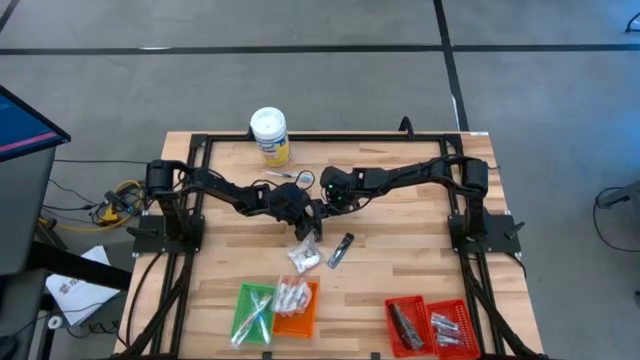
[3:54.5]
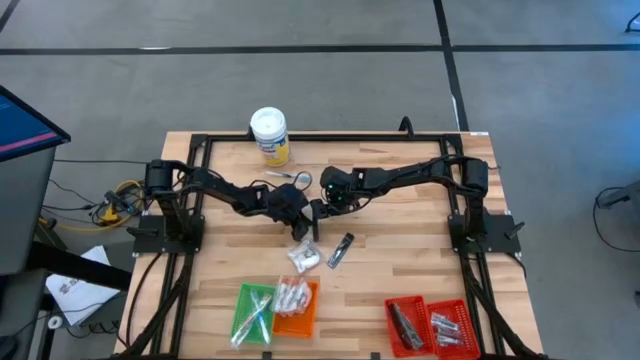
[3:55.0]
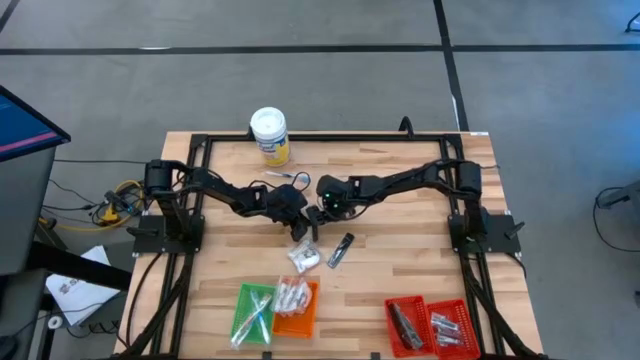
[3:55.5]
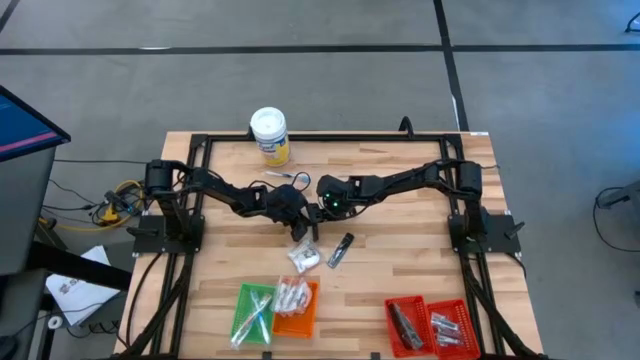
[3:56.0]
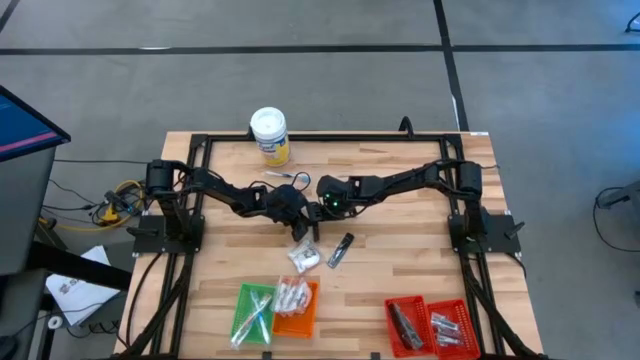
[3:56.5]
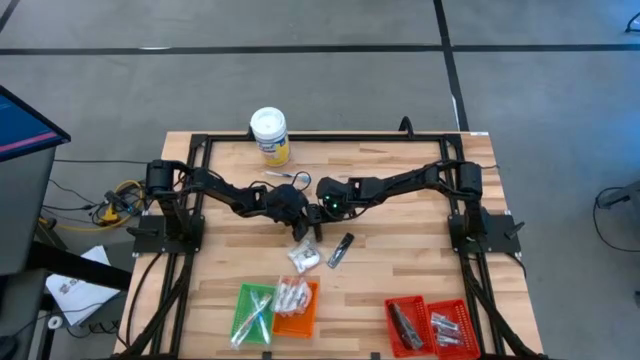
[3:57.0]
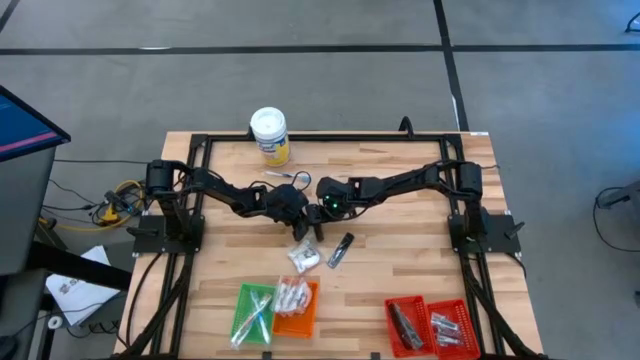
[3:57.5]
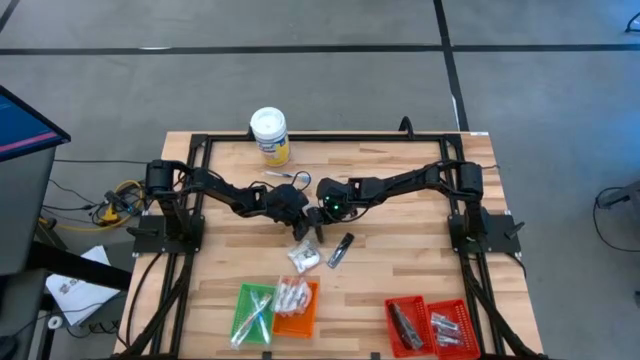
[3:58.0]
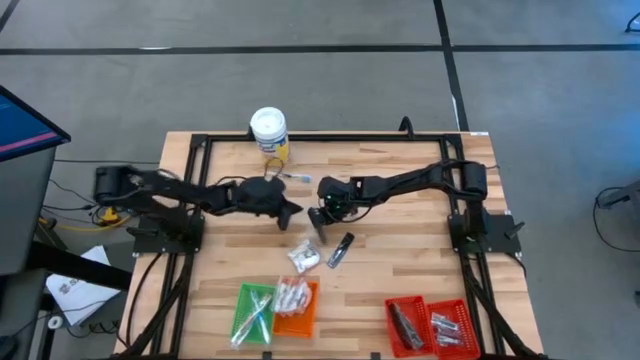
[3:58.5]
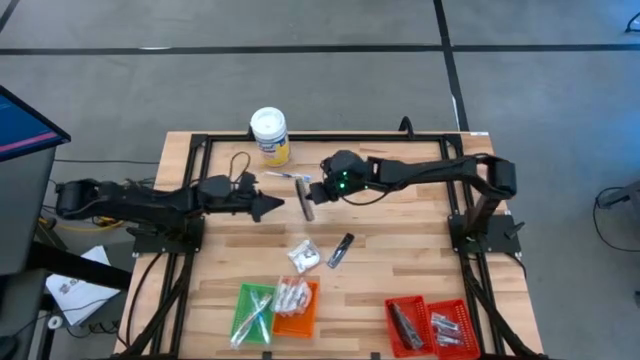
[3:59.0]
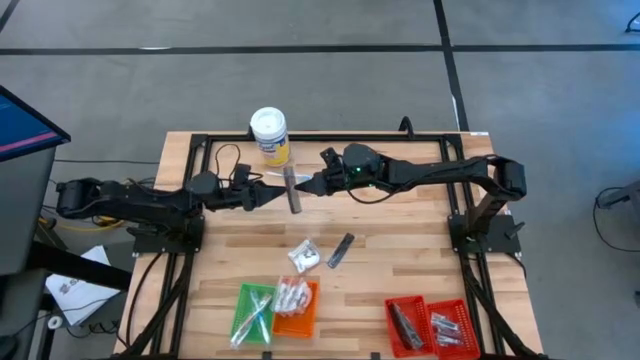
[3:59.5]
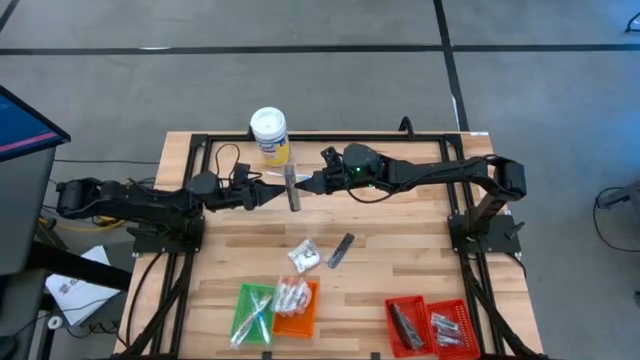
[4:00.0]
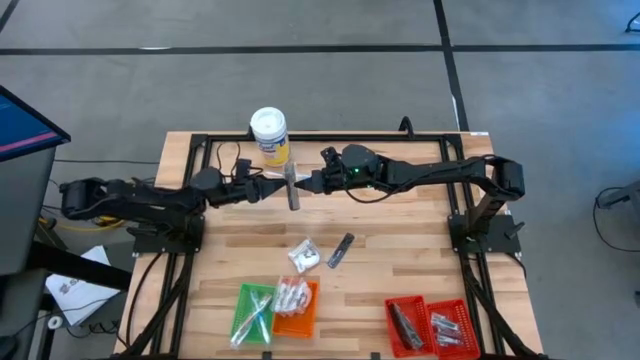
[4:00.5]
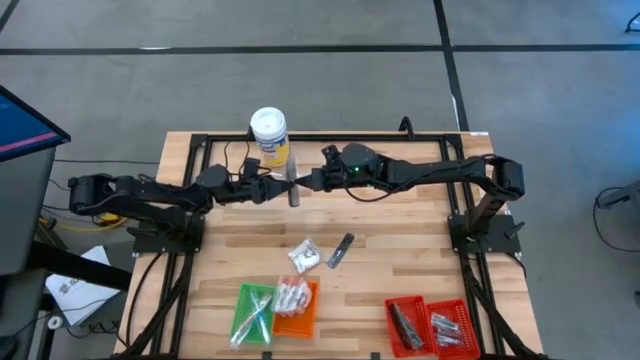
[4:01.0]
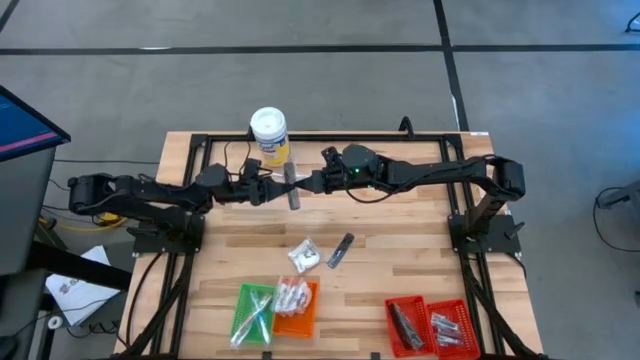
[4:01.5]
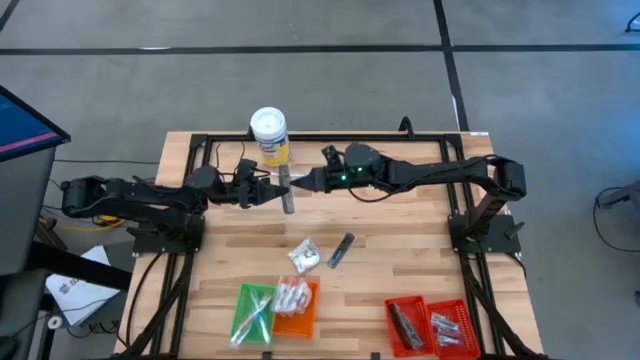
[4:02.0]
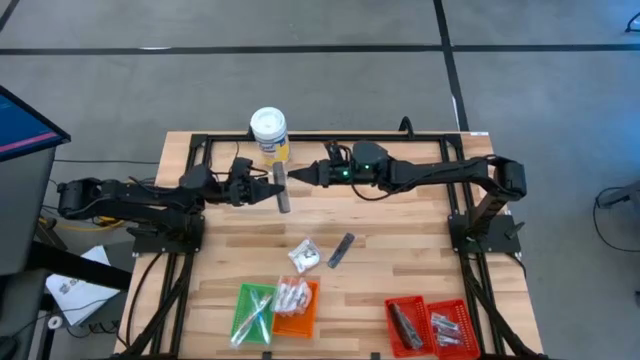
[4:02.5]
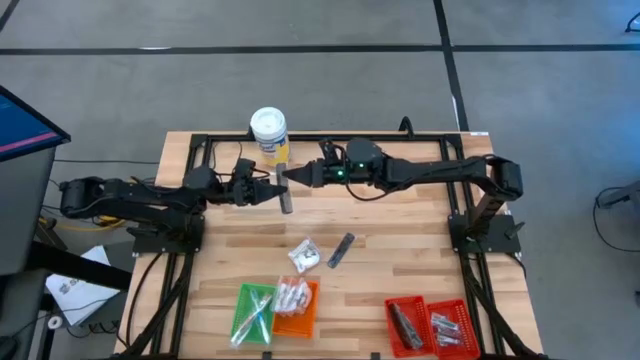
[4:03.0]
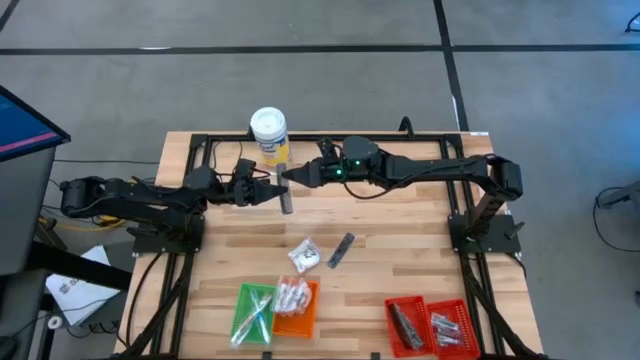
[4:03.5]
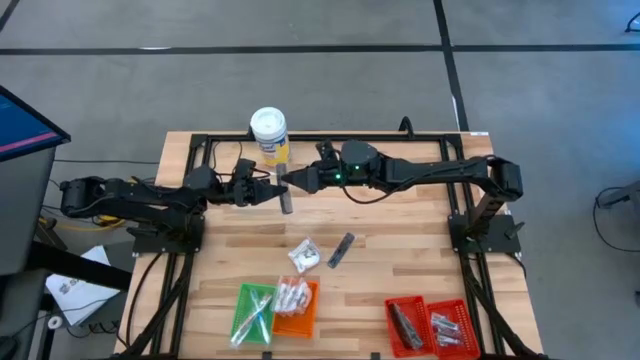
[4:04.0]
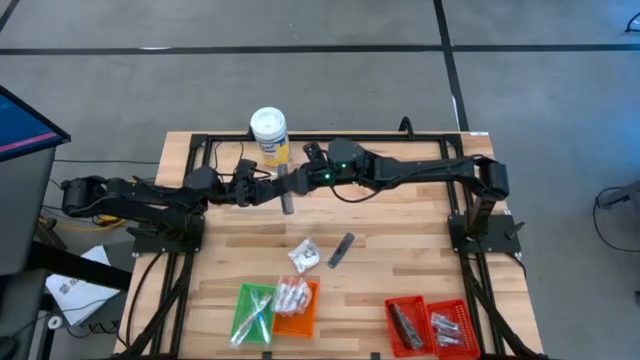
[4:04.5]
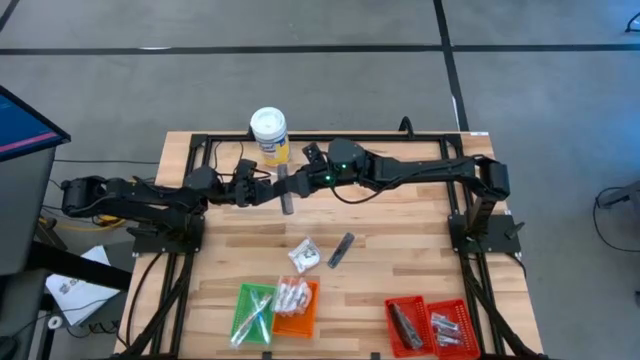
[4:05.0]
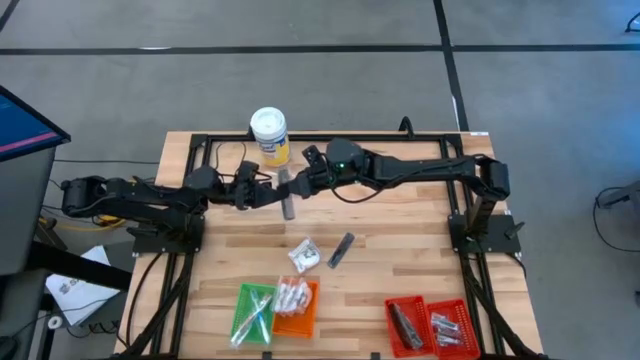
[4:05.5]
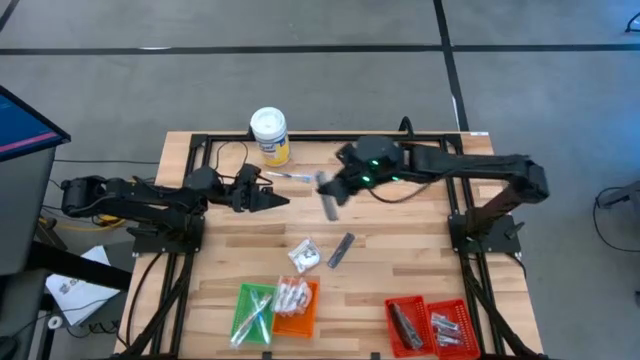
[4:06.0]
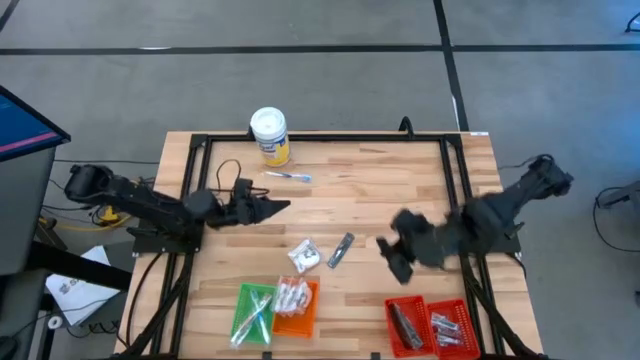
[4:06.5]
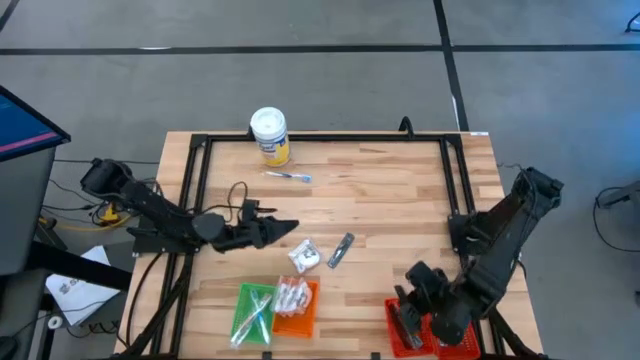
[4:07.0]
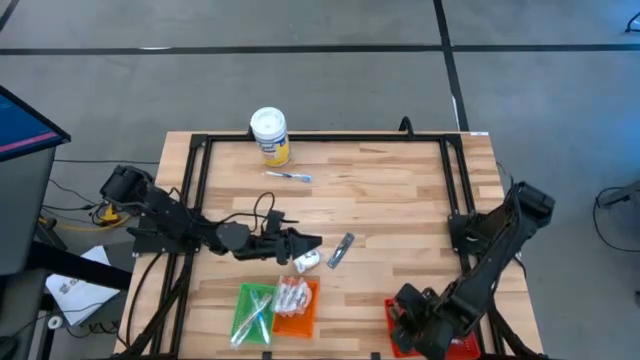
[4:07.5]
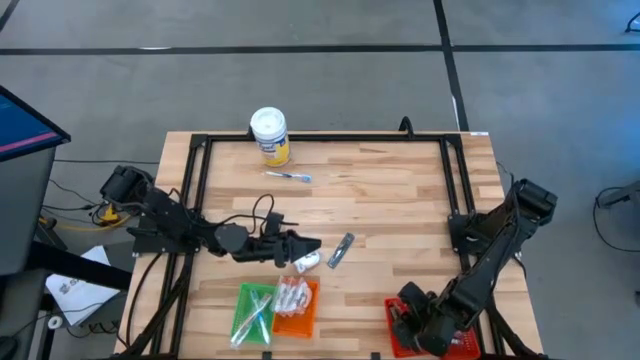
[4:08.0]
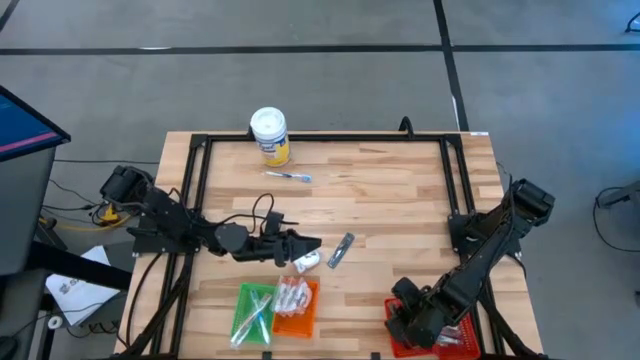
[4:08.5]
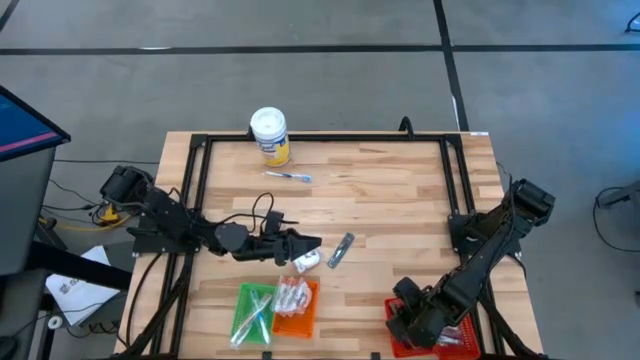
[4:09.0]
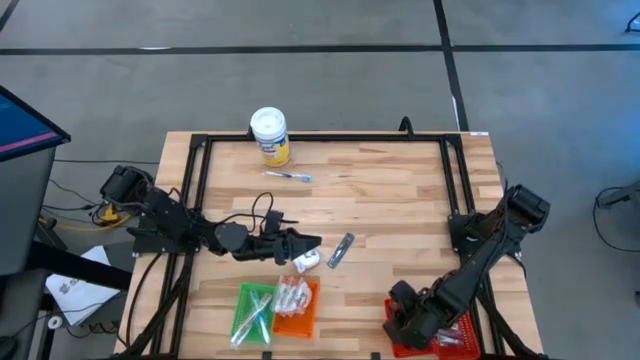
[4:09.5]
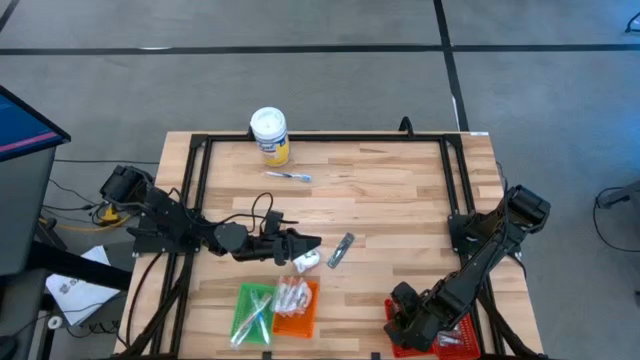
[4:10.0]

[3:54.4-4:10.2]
Task: Pick & Place Travel size toiletries
Put the black comb into the left red basket

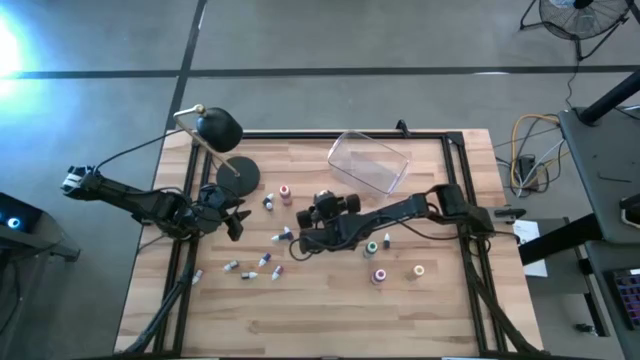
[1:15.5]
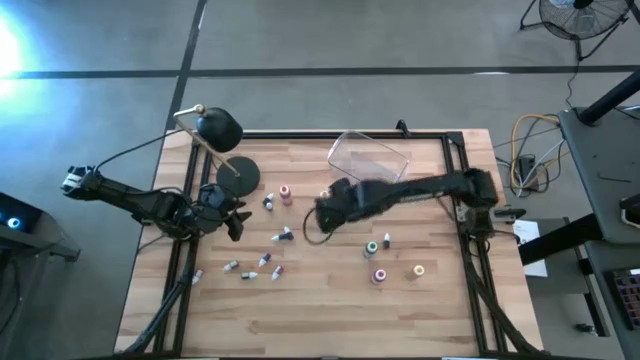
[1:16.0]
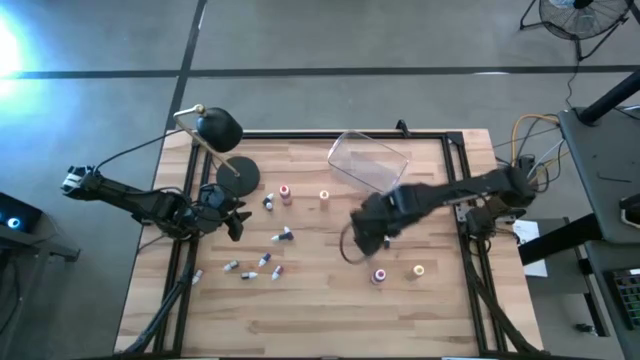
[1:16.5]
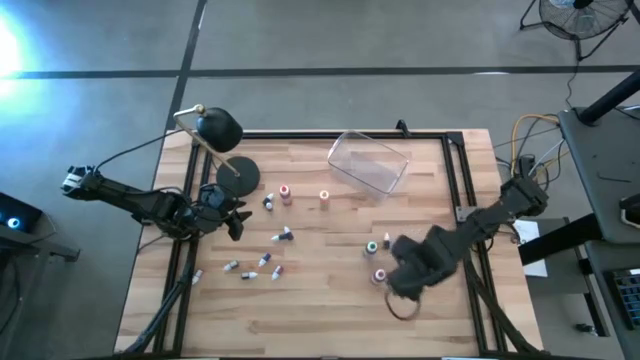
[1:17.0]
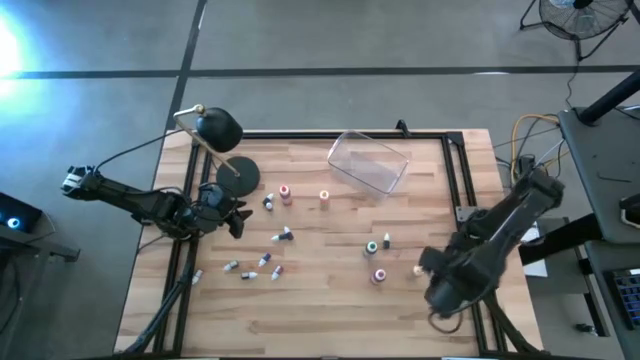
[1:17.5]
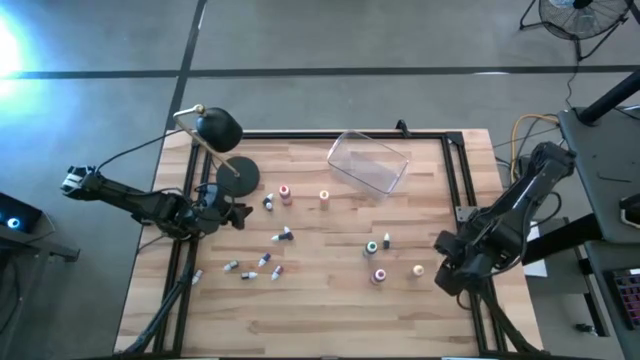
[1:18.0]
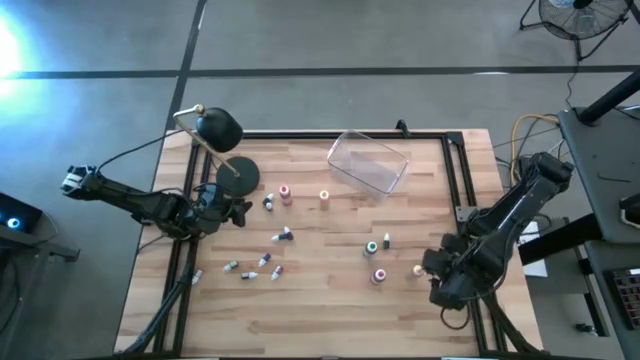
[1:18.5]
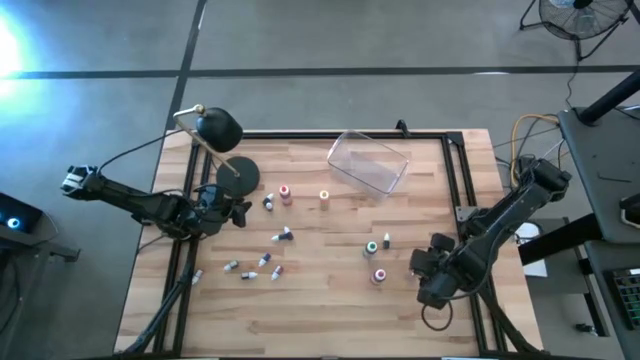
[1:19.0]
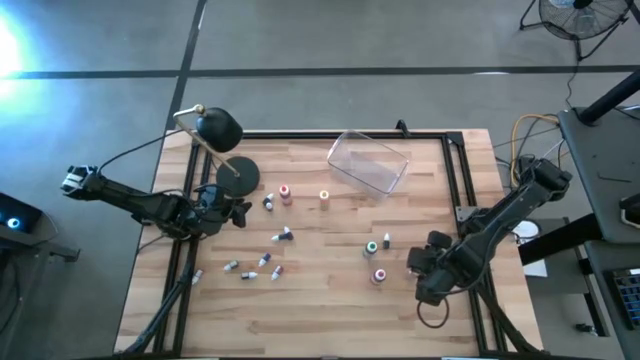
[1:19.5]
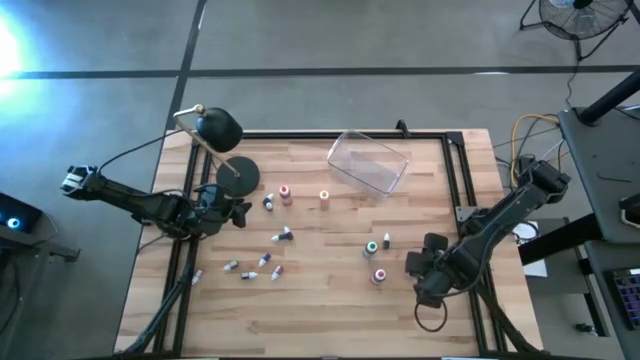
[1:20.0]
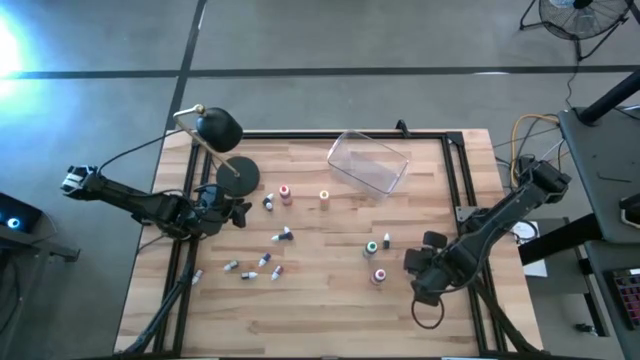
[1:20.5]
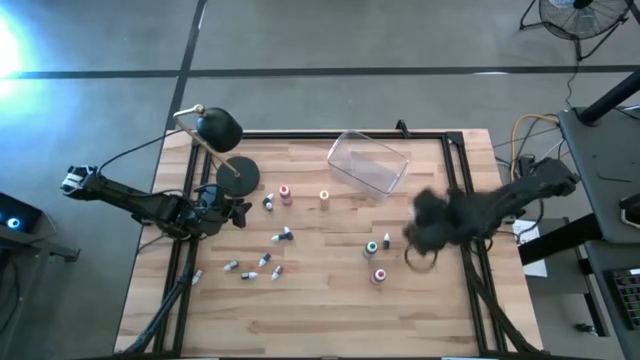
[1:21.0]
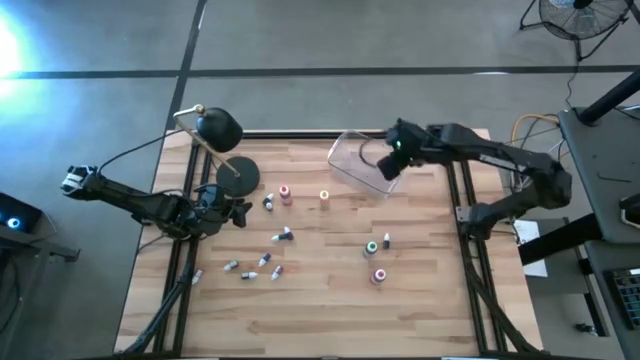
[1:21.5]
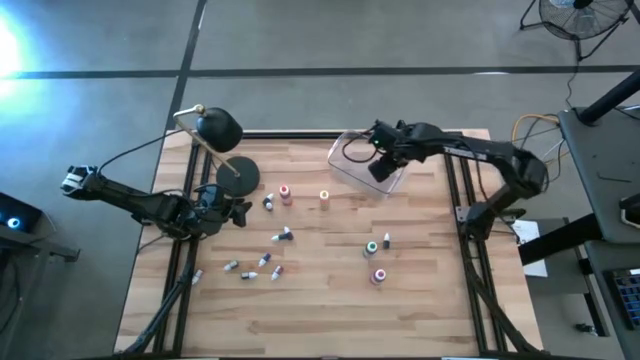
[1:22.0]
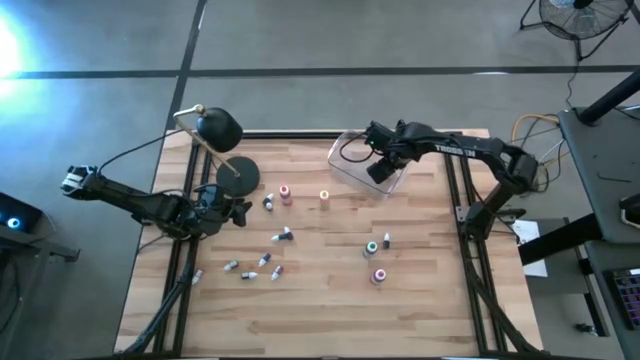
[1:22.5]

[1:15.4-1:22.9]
Task: Pick & Place food coloring
Put the large bottom yellow food coloring bottle into the transparent bin
